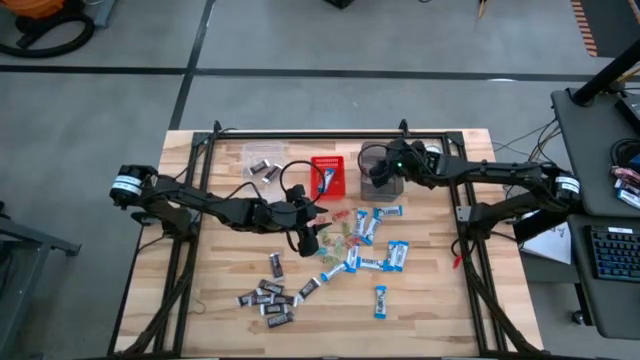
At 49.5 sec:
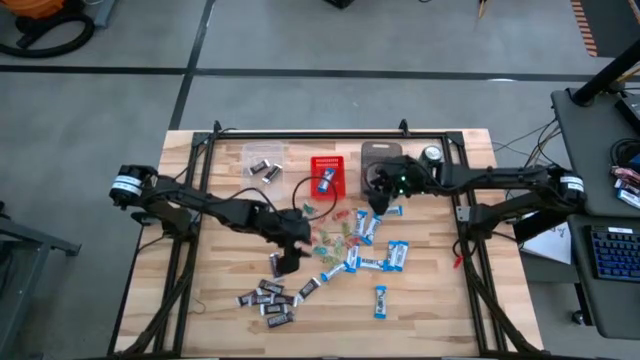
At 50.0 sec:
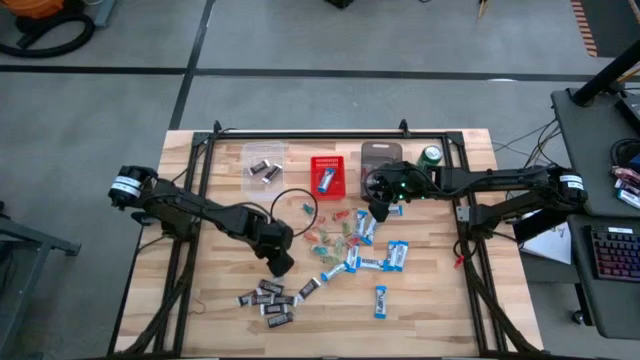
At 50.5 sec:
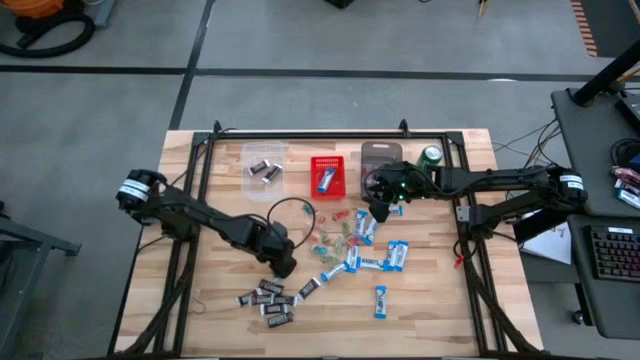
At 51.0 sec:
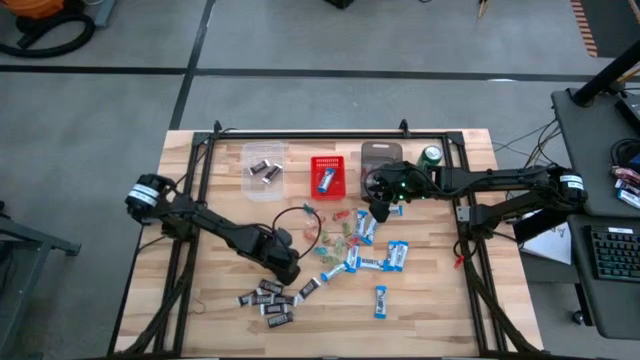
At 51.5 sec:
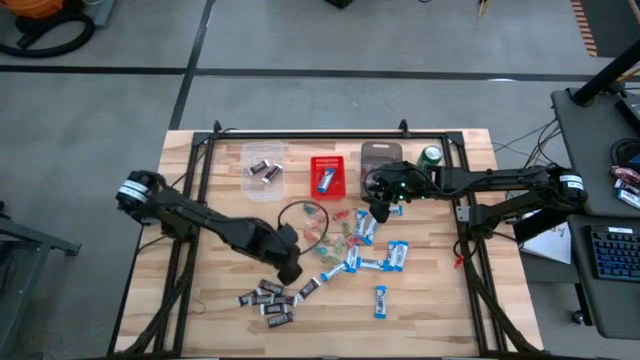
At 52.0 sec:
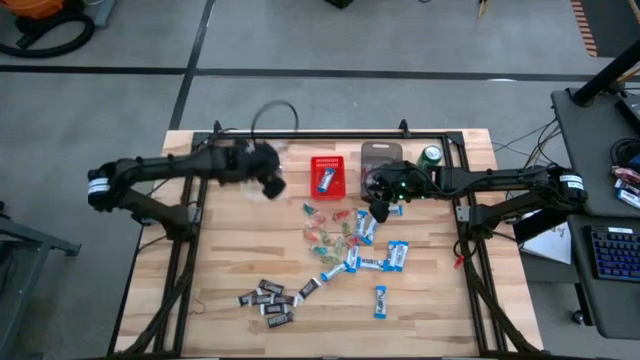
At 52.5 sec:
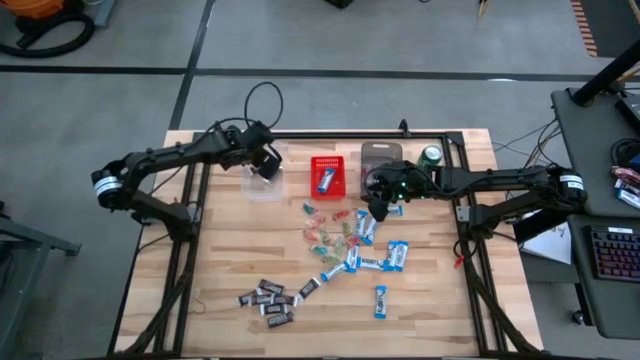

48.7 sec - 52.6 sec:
Task: Sort candy
Put the brown chocolate bar into the transparent bin

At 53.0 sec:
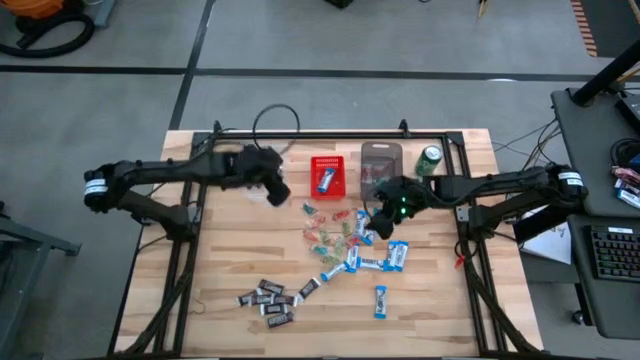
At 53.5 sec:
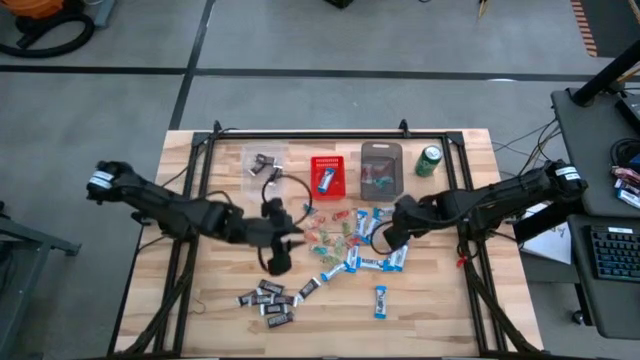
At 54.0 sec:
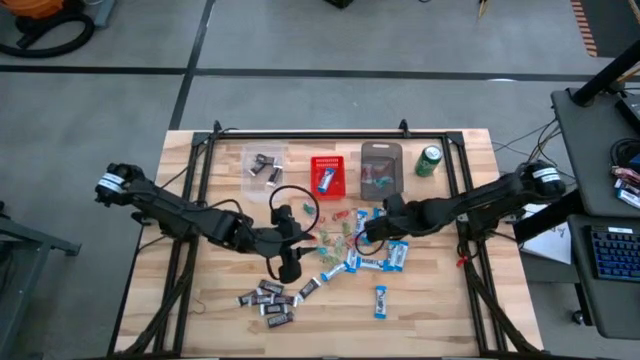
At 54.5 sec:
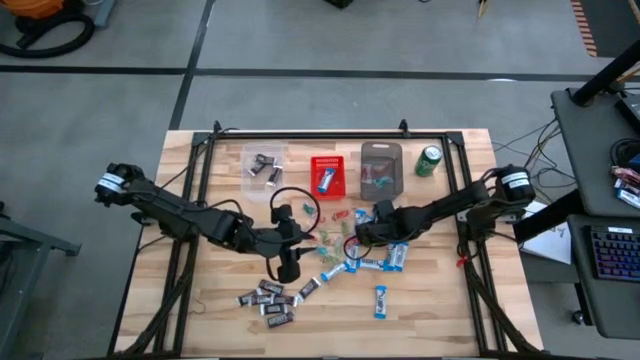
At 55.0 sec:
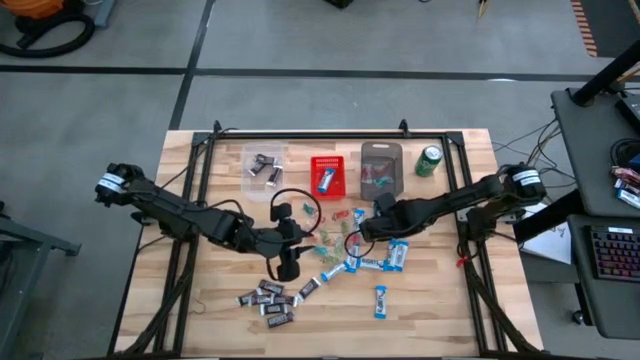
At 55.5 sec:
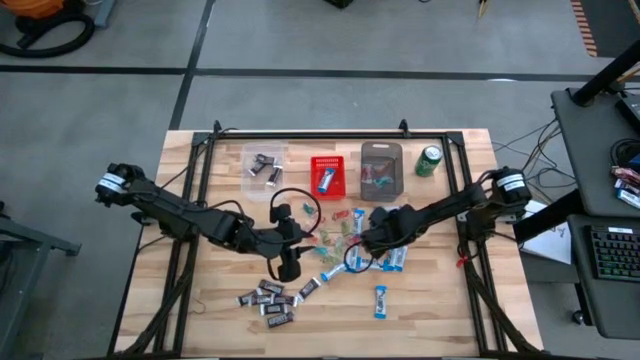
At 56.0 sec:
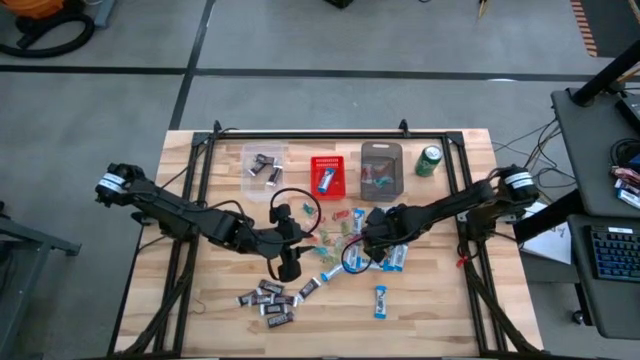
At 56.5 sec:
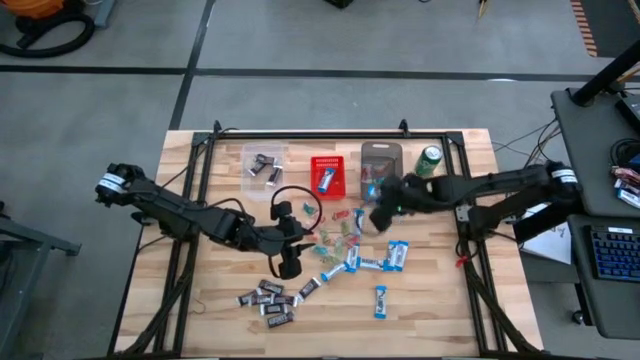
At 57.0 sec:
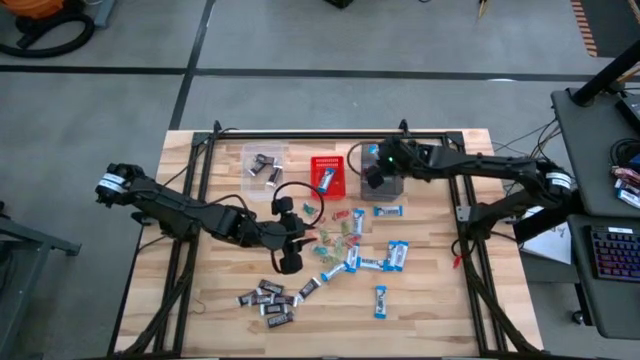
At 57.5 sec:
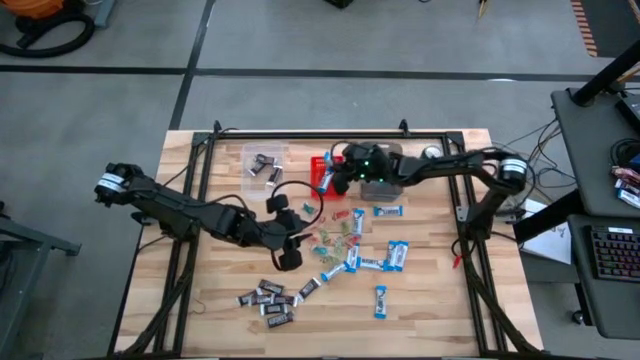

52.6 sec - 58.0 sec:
Put the white chocolate bar into the red bin

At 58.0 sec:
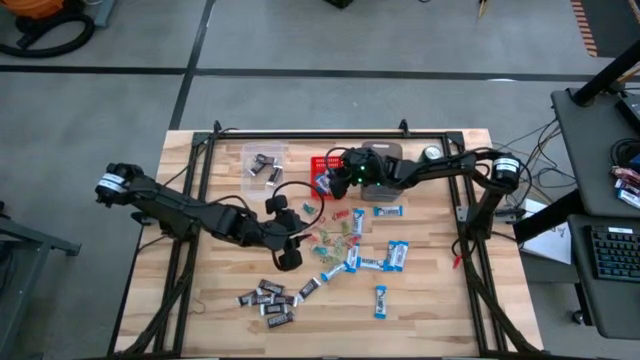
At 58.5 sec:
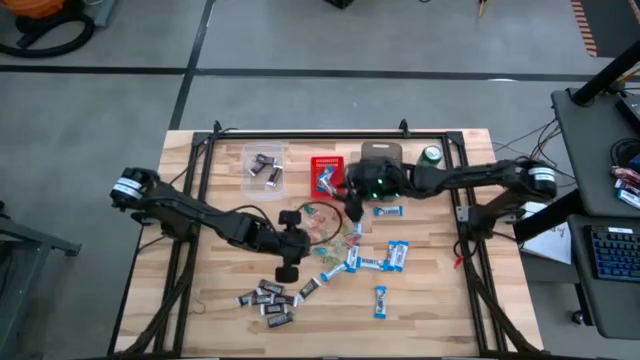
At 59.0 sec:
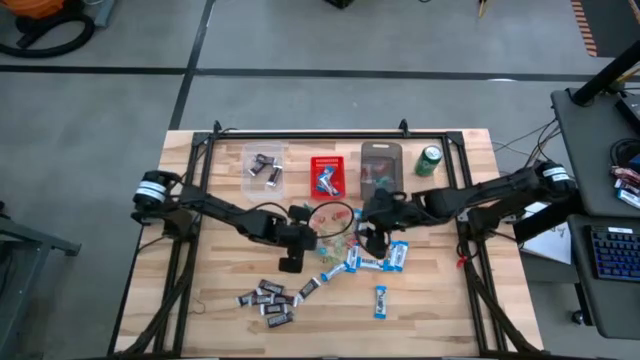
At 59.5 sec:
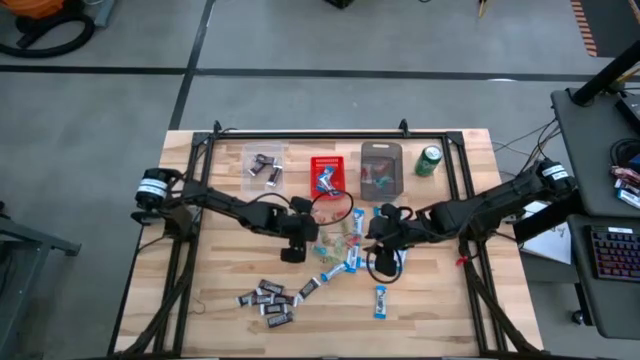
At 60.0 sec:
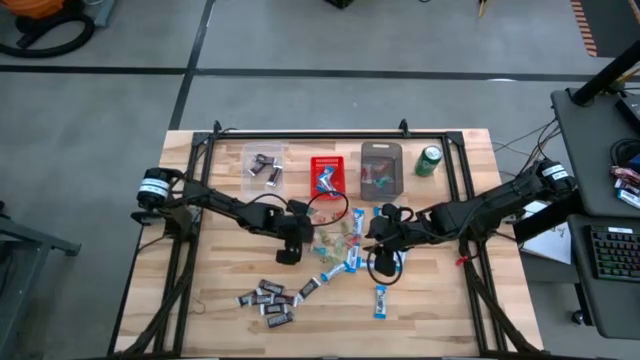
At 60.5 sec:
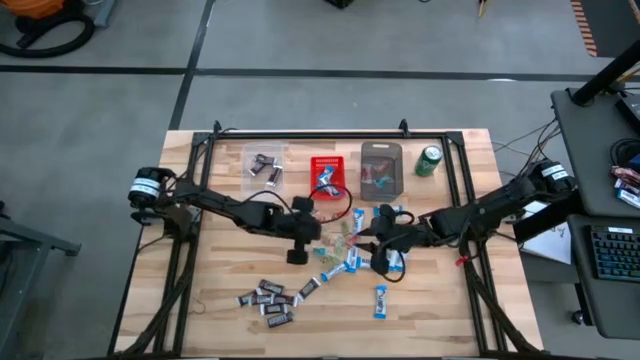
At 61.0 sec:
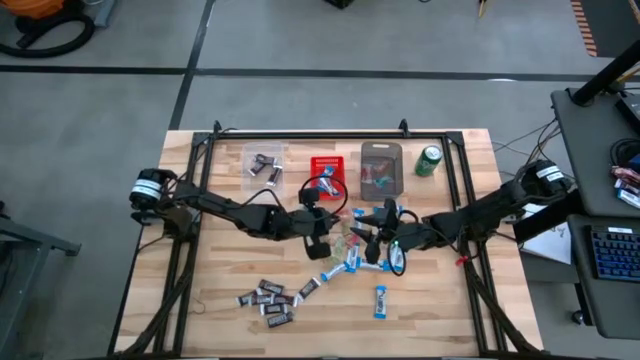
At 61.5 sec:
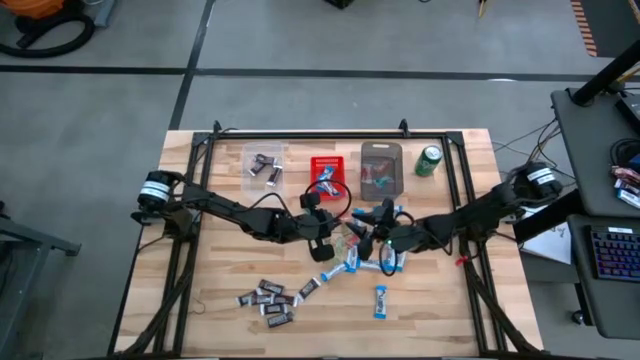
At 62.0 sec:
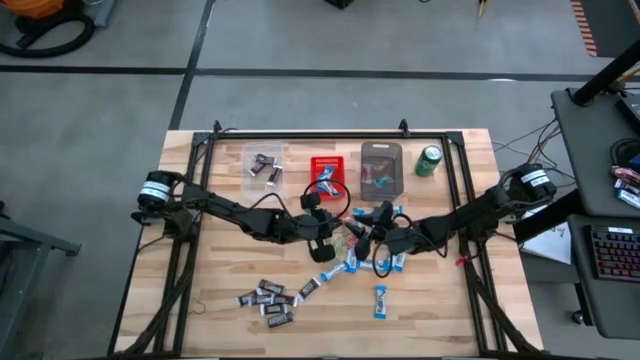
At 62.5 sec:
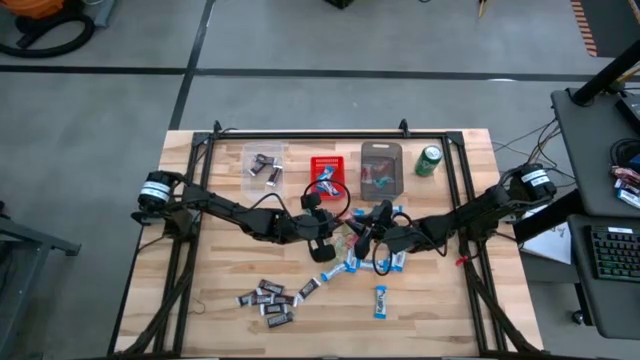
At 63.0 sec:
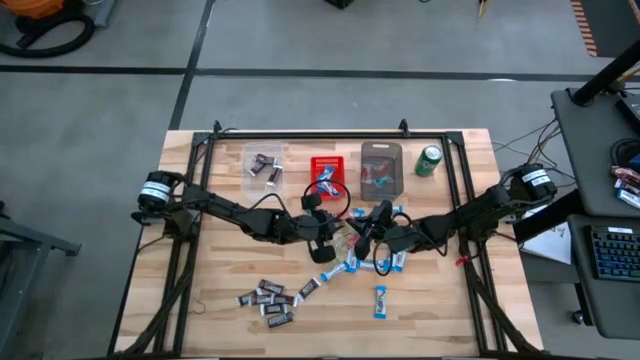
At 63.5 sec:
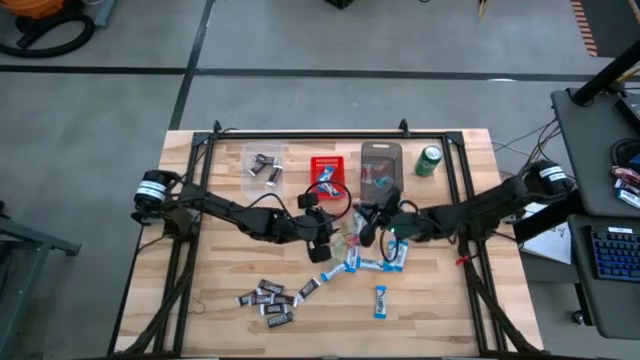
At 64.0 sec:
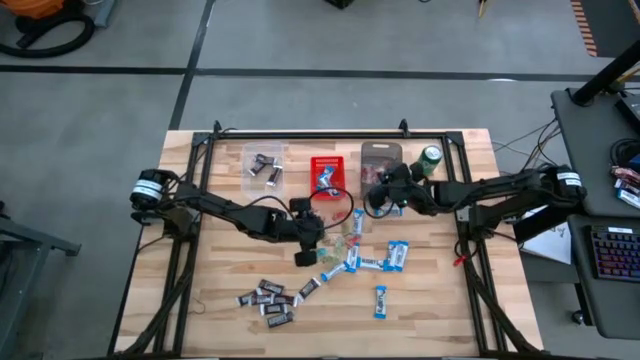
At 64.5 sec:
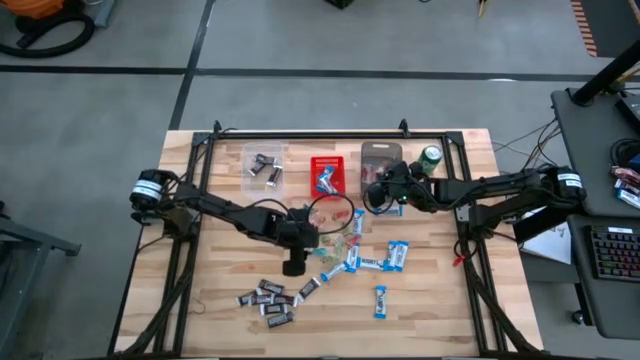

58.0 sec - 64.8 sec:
Put the orange gummy candy into the black bin

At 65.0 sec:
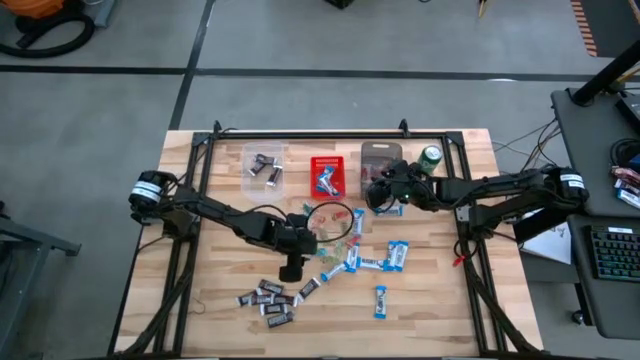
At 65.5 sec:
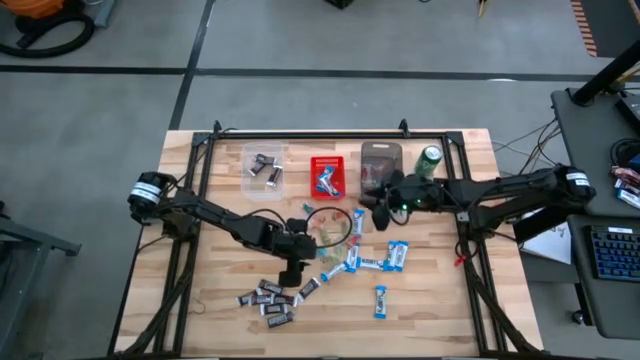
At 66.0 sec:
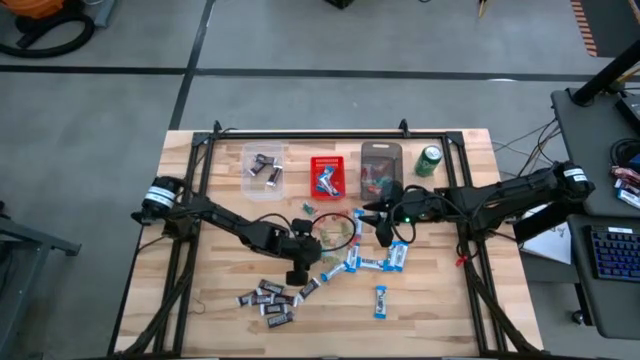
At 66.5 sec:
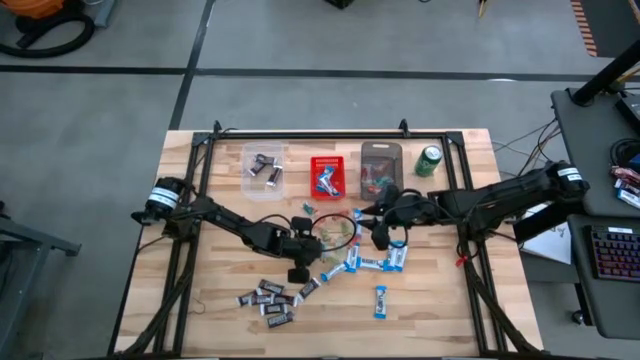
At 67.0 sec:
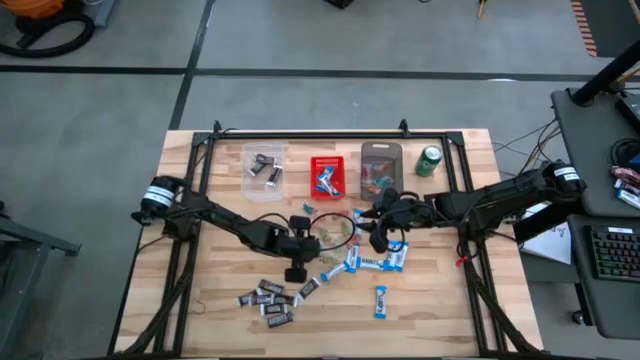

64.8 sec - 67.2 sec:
Put the blue gummy candy into the black bin

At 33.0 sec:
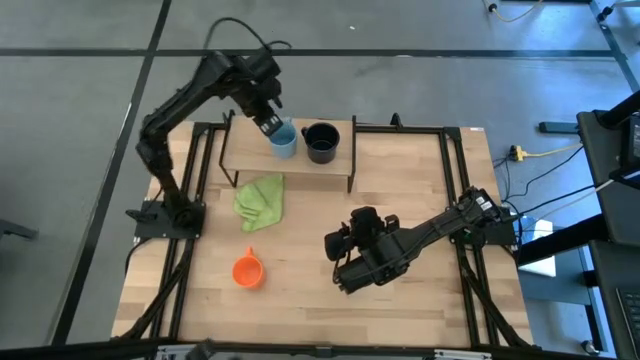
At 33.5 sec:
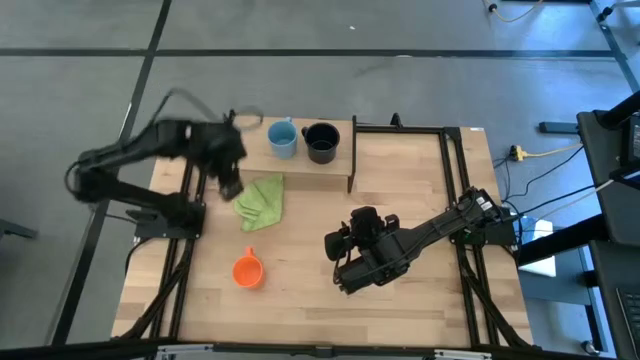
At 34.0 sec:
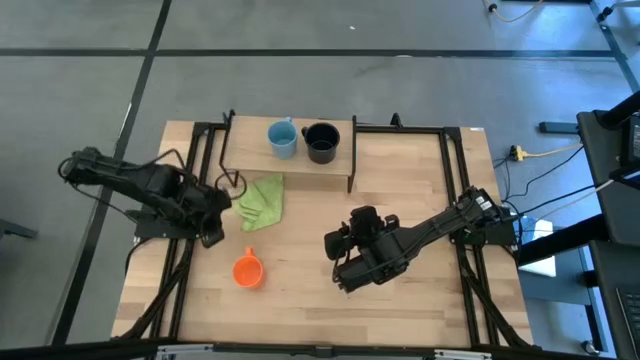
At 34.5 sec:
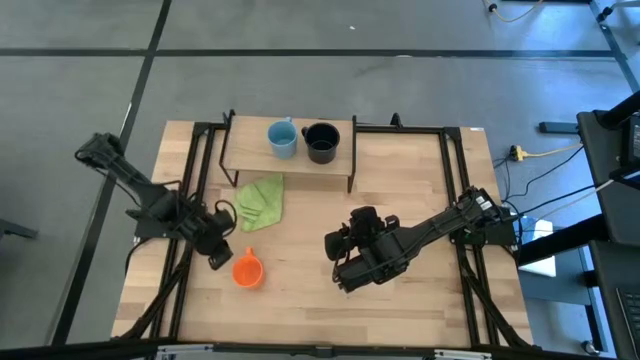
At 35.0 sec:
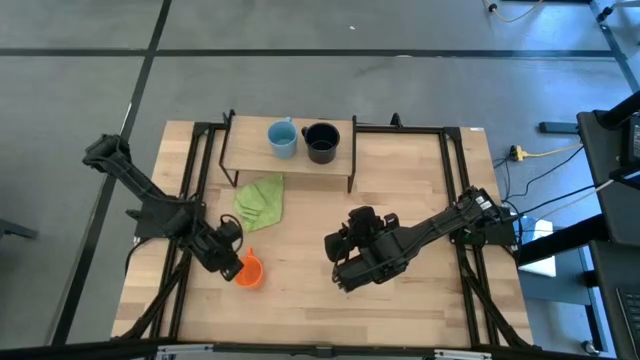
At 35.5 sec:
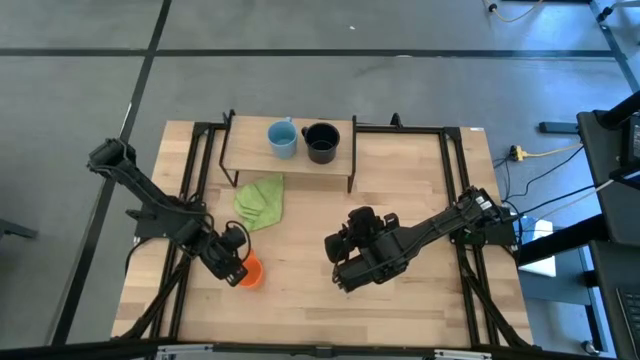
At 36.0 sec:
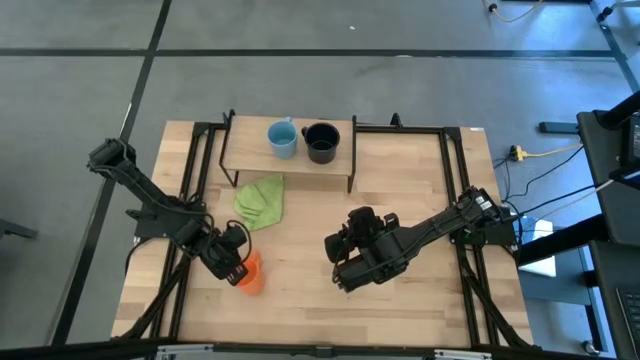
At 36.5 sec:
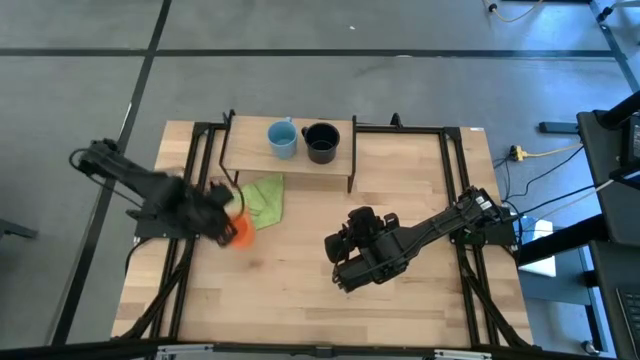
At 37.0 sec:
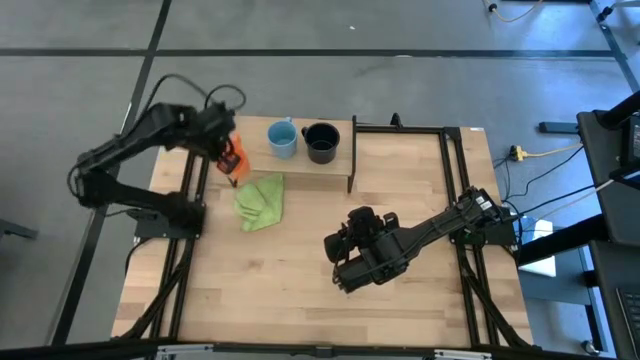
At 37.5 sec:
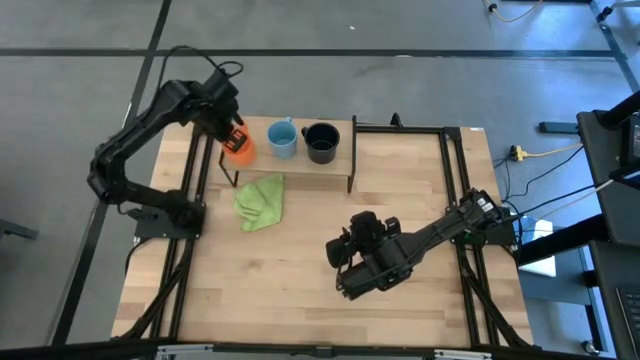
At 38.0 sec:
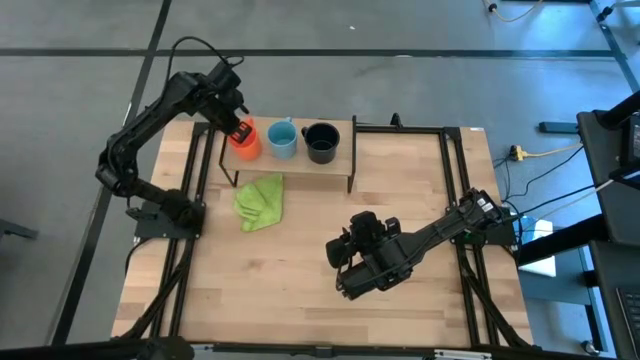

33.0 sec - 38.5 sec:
Task: Stack small to large cups/mugs on shelf
Put the orange mug on the shelf
